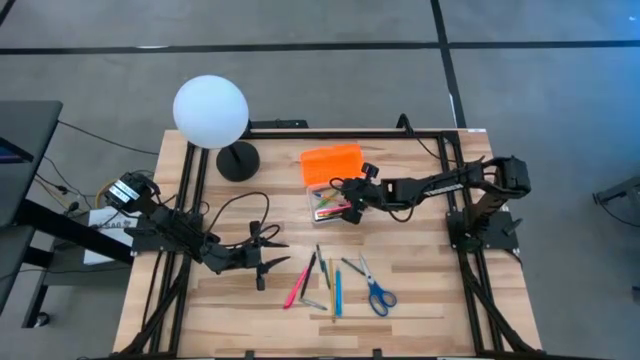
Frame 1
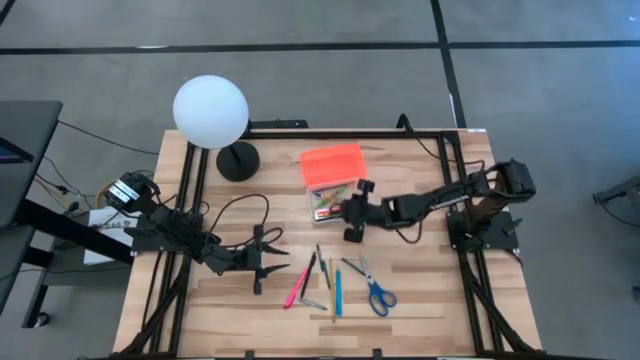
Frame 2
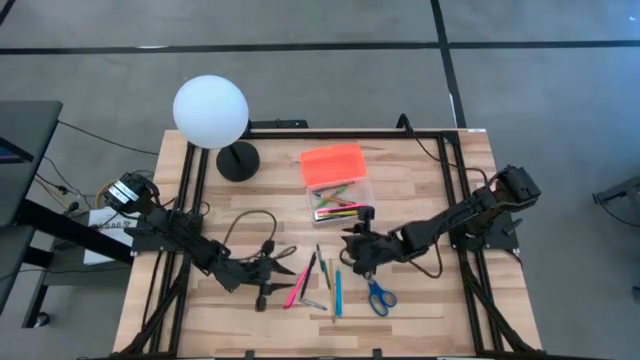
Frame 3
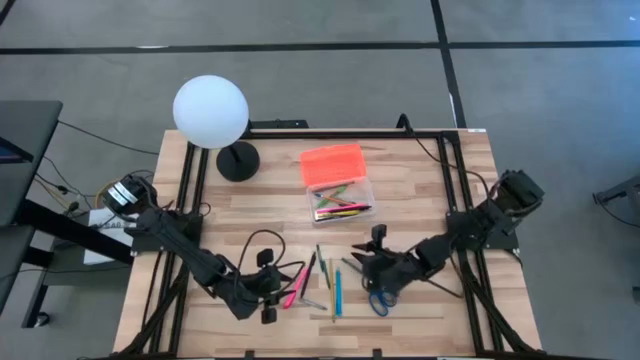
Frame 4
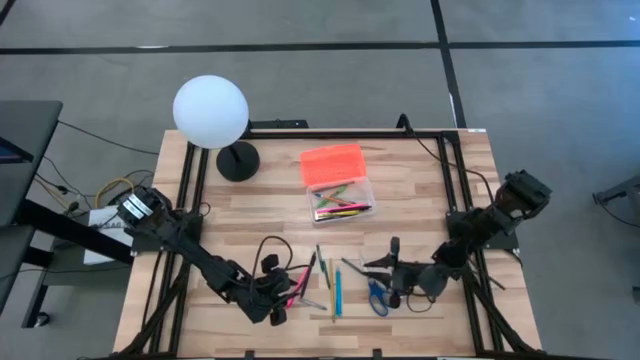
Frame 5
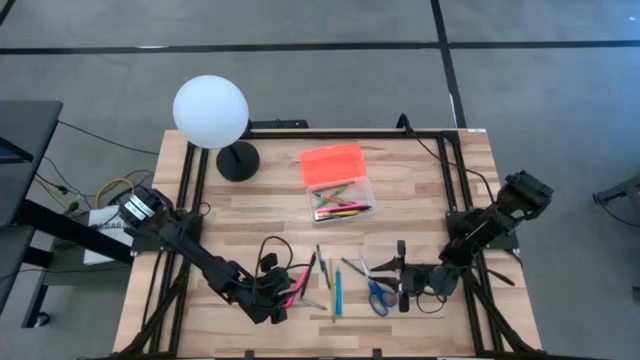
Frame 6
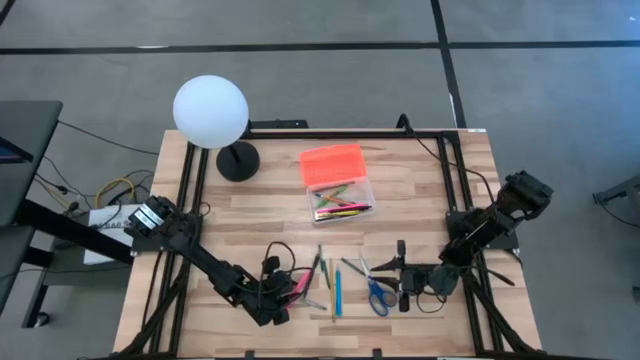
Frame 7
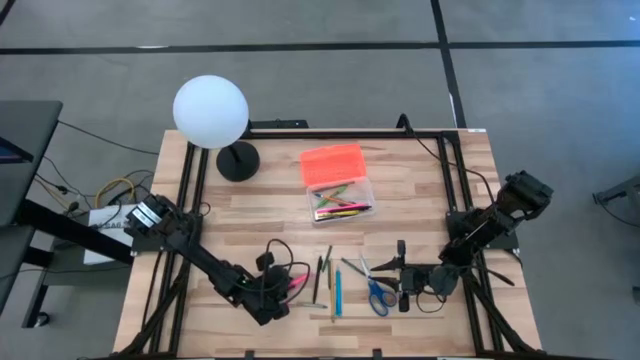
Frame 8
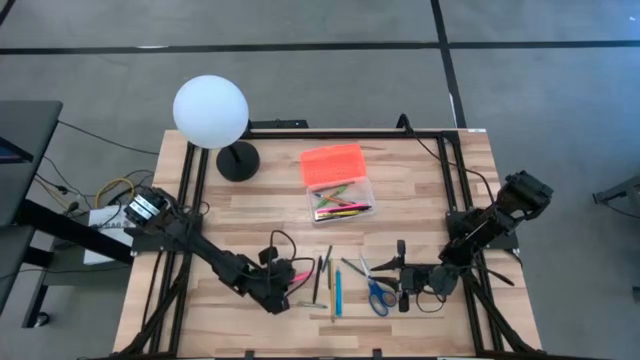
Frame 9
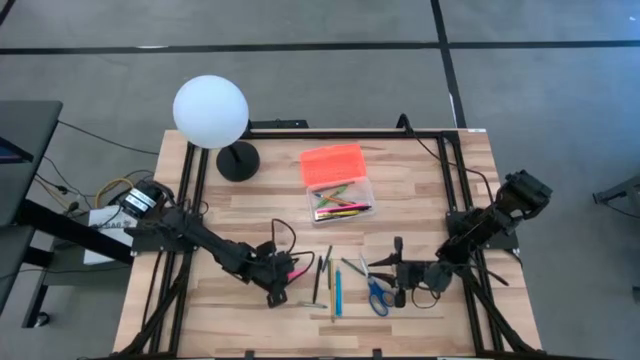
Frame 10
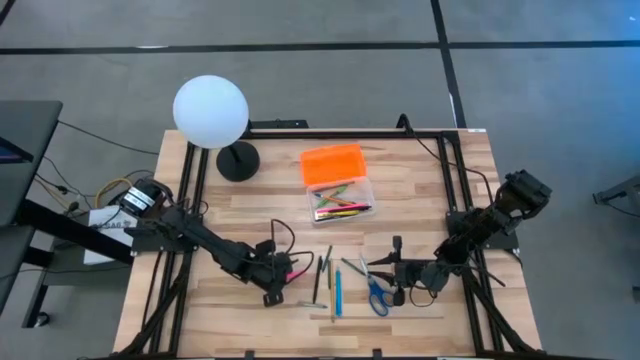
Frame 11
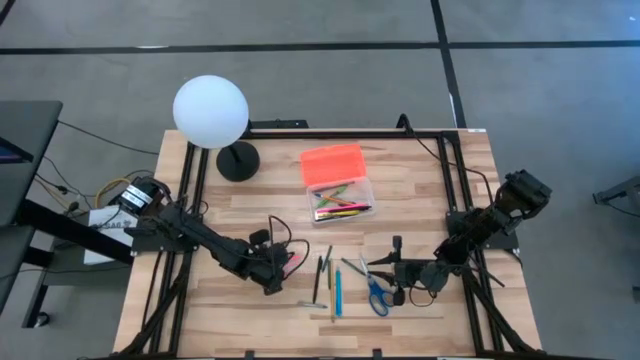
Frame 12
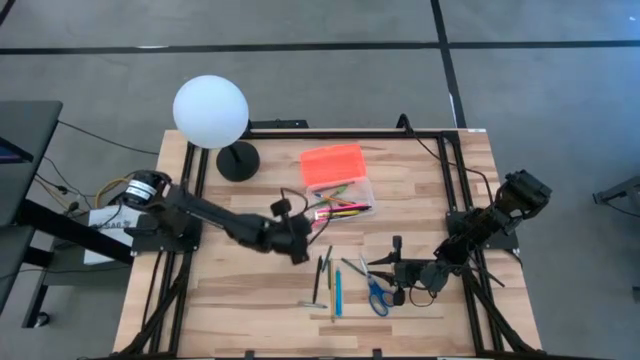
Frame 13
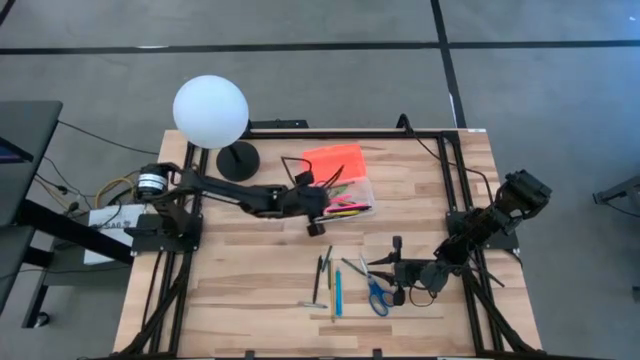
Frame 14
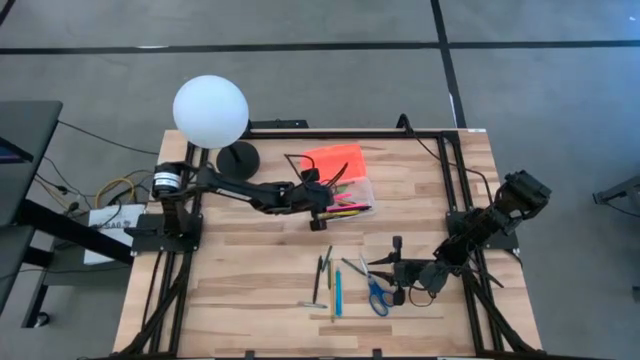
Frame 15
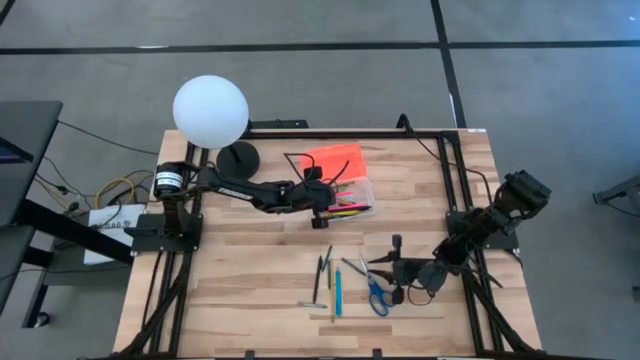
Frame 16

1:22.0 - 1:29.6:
Task: Pick & place school supplies into a supply box
Put the pink pen into the orange supply box

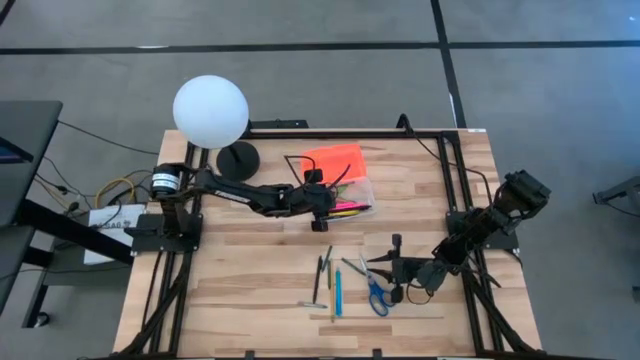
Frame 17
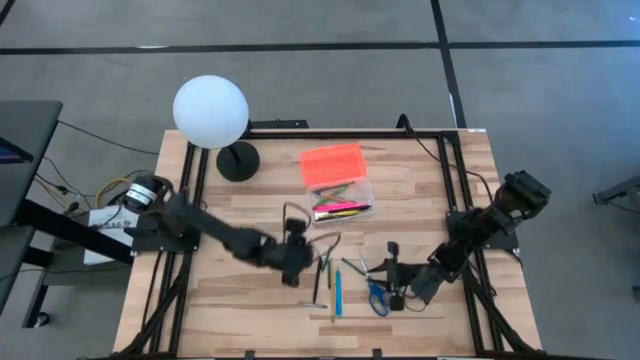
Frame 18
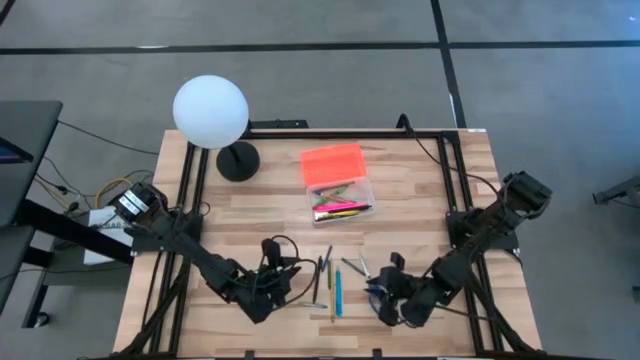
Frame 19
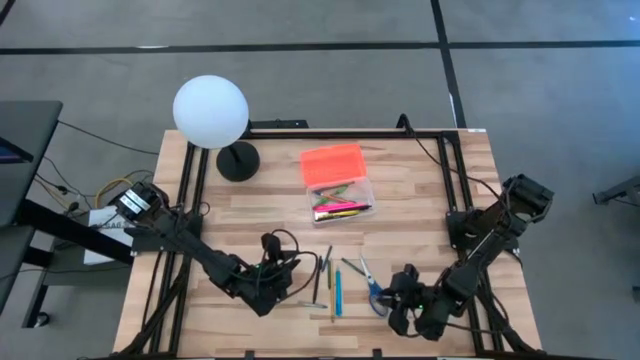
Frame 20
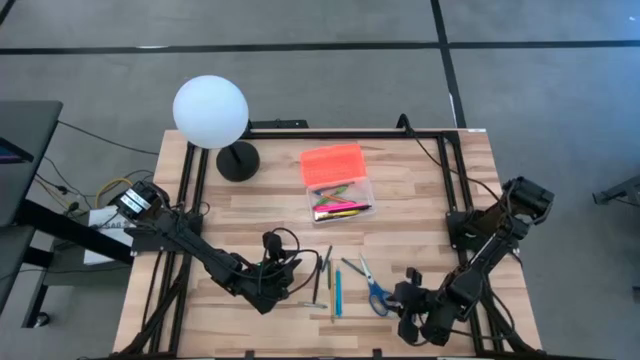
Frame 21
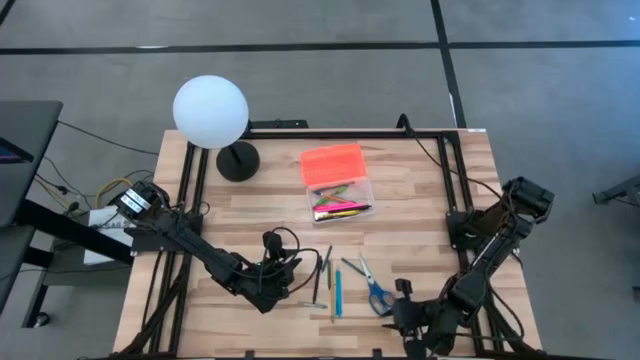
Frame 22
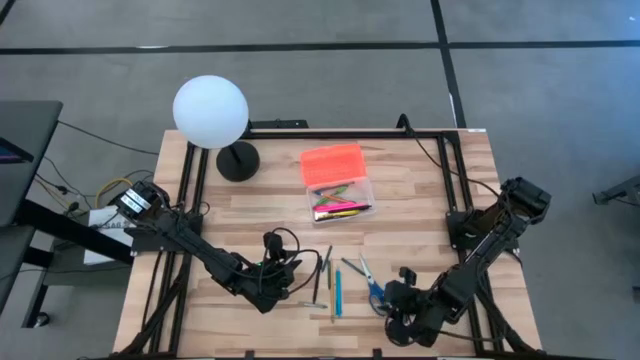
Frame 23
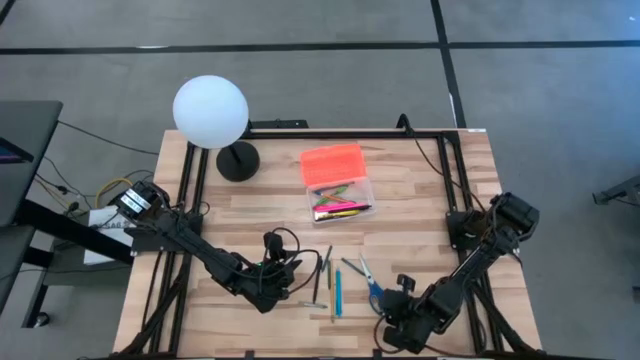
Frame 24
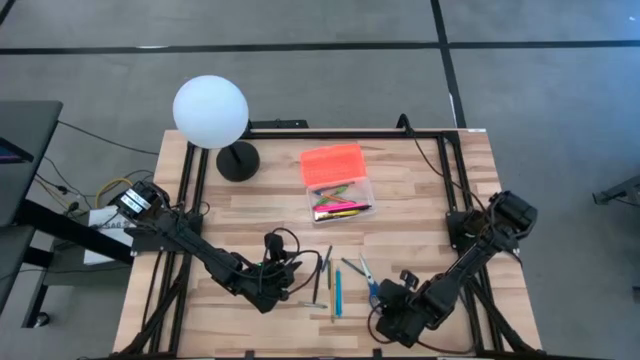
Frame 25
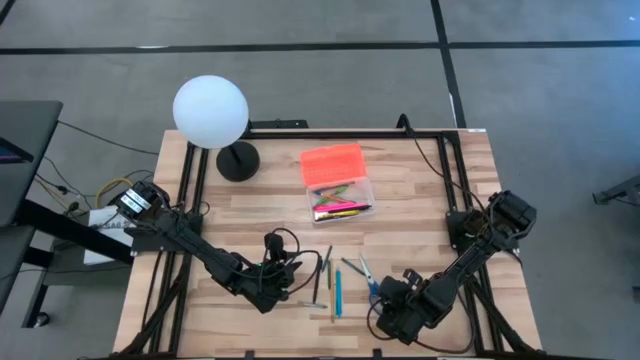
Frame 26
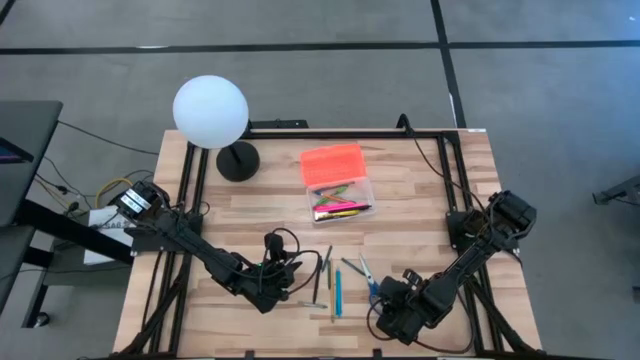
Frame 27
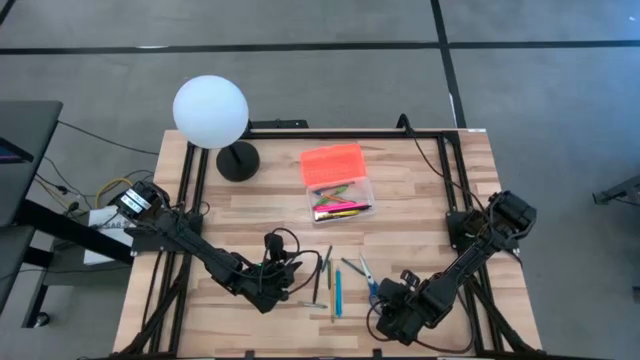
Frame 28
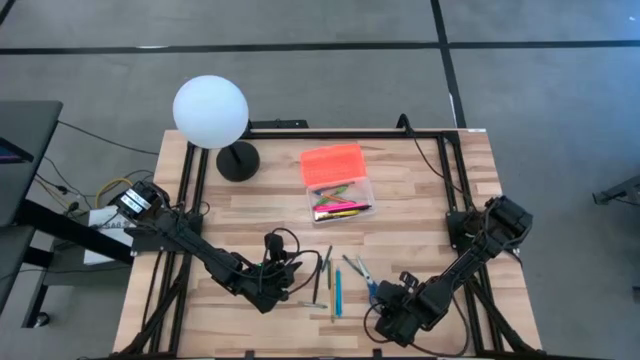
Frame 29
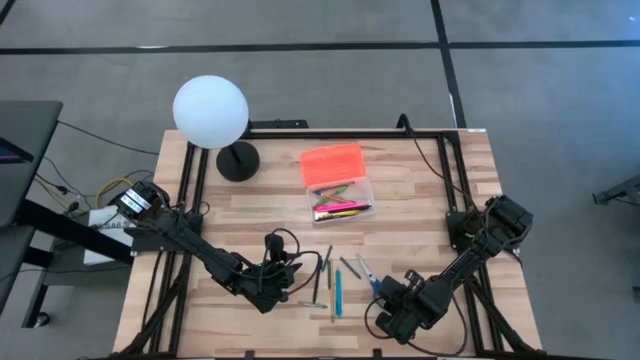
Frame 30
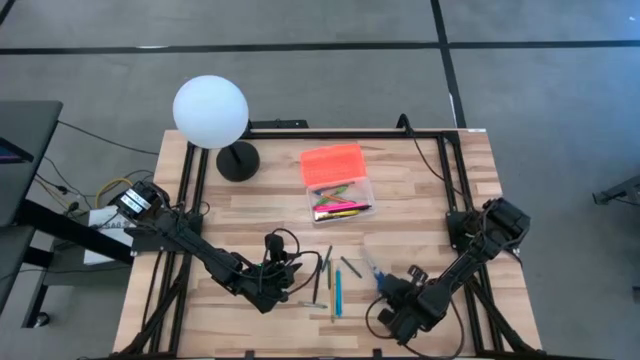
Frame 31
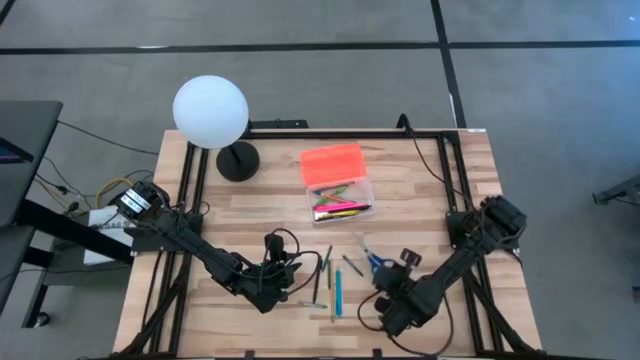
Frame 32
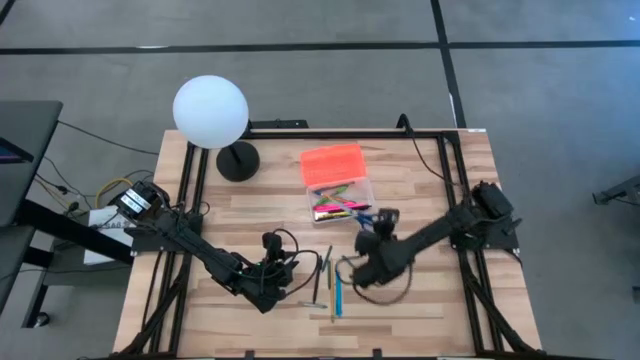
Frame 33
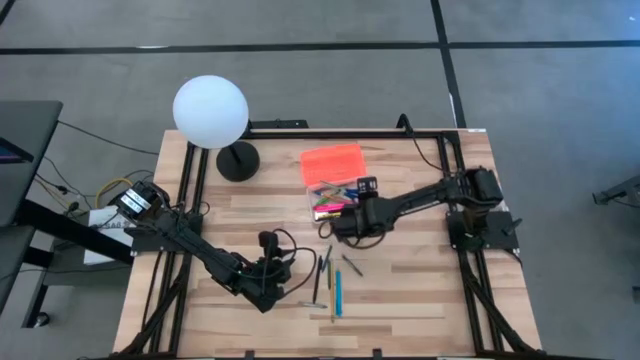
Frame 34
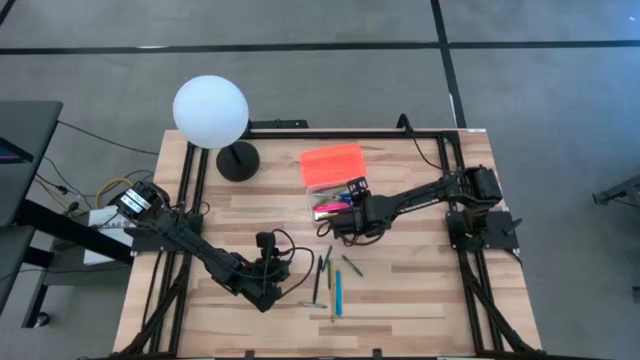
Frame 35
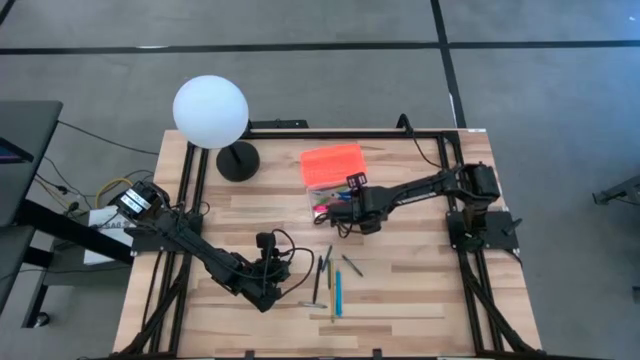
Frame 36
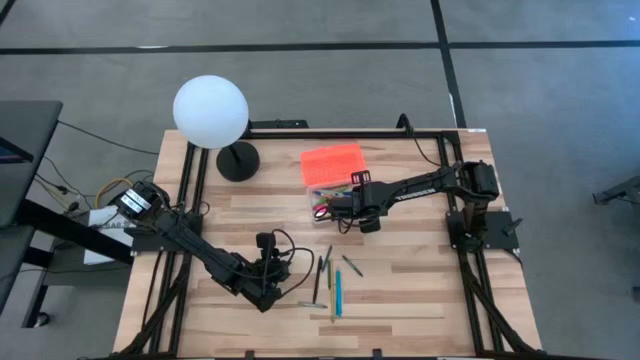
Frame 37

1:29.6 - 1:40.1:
Put the blue scissors into the orange supply box

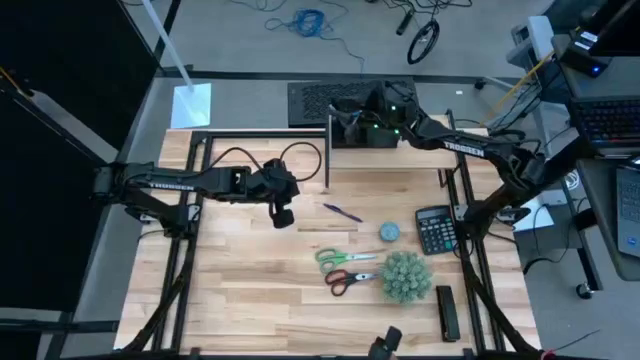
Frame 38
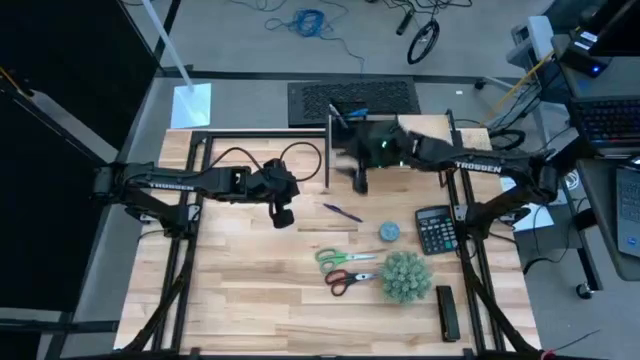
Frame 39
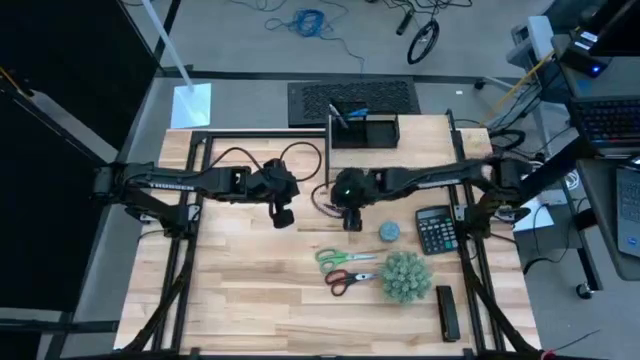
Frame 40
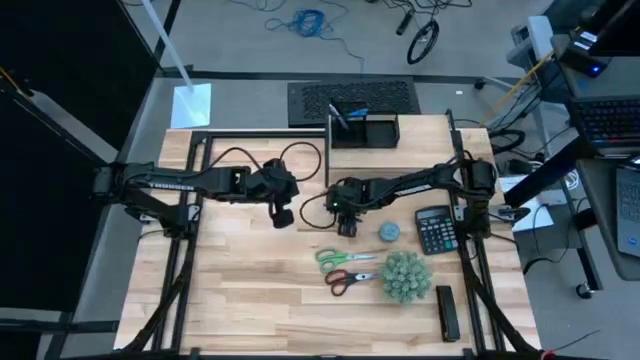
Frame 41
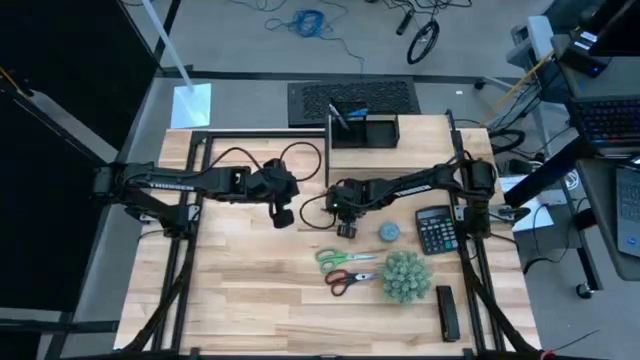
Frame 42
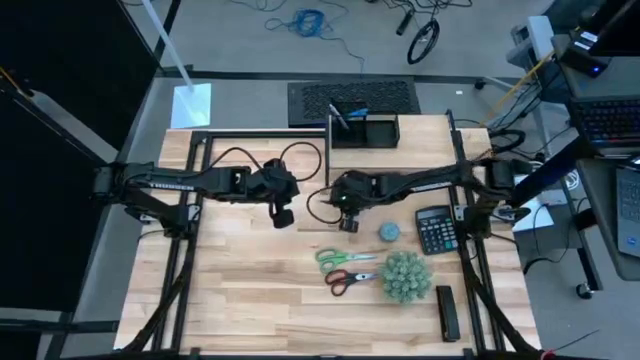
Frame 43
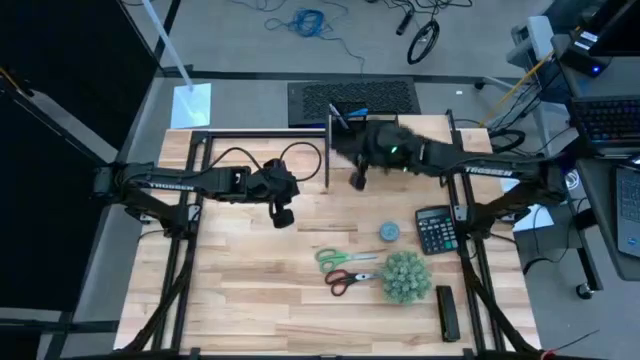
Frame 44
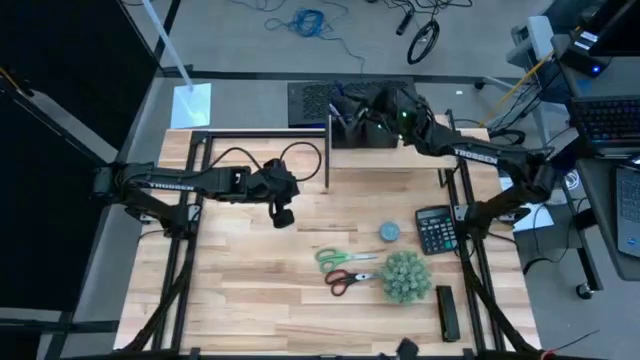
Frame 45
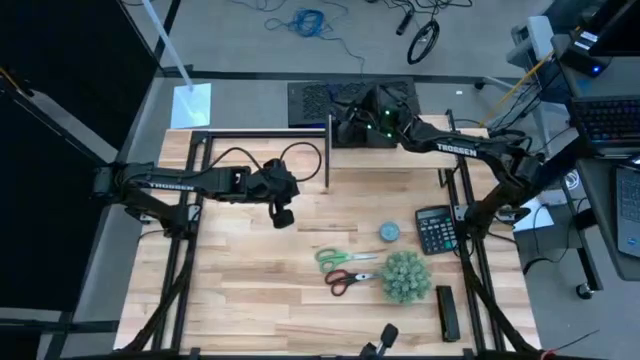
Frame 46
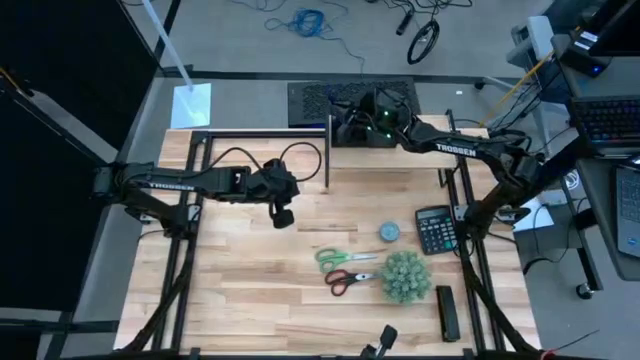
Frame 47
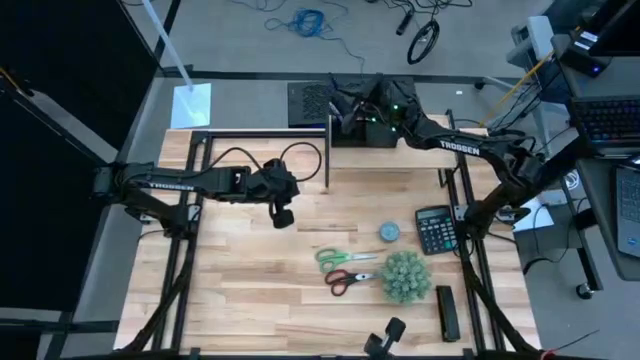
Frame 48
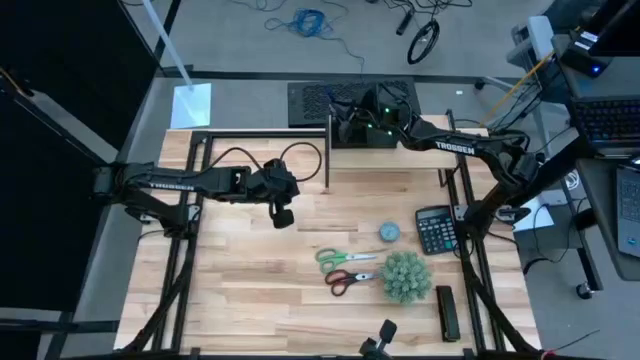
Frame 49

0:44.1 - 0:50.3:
Task: Pick and place office supplies into organizer
Put the dark blue pen into the black desk organizer on the shelf
